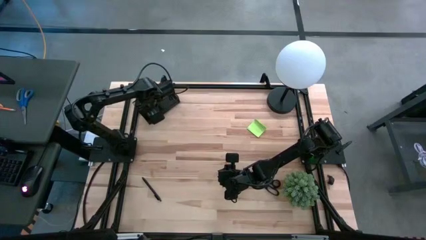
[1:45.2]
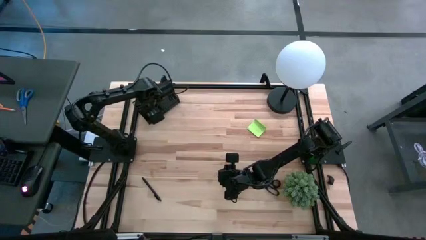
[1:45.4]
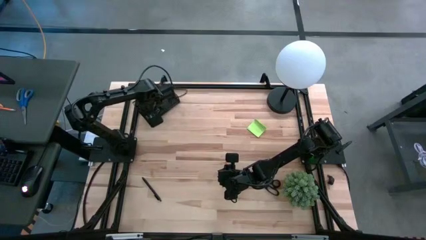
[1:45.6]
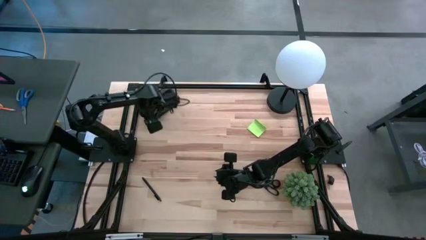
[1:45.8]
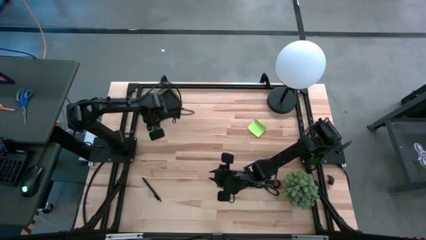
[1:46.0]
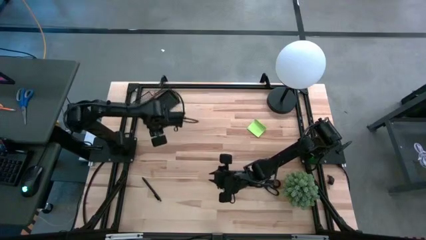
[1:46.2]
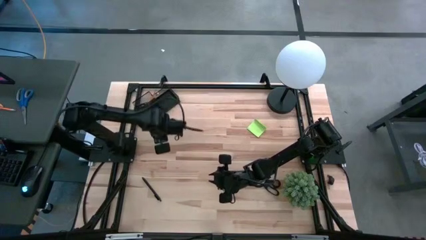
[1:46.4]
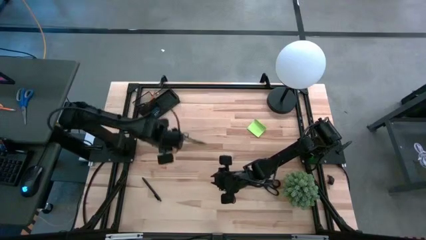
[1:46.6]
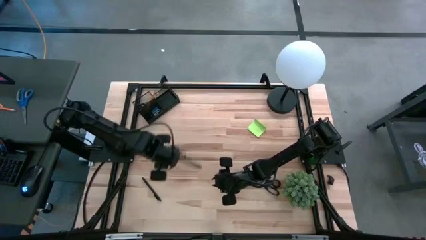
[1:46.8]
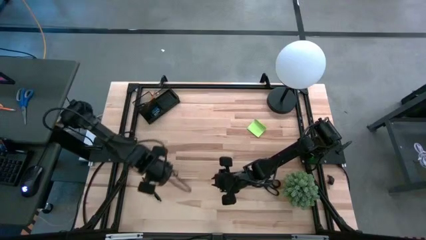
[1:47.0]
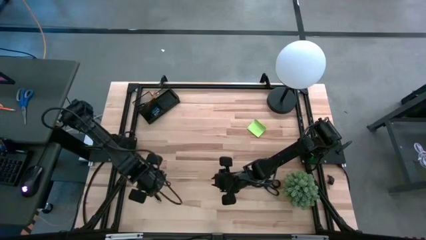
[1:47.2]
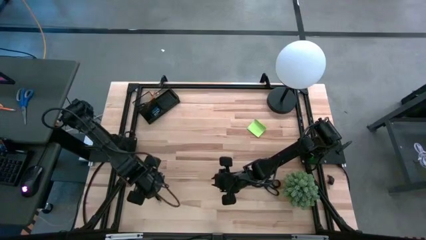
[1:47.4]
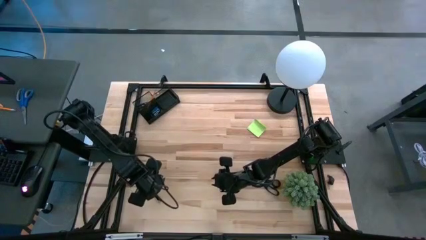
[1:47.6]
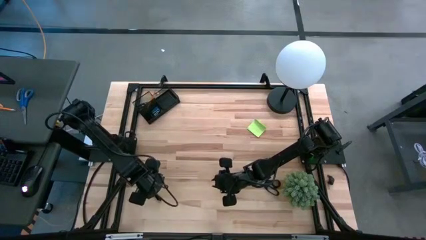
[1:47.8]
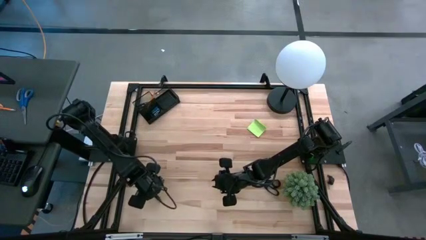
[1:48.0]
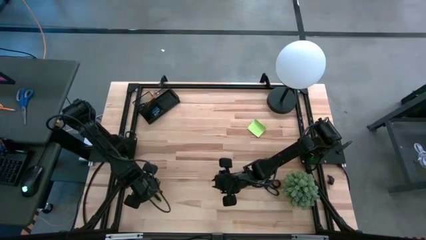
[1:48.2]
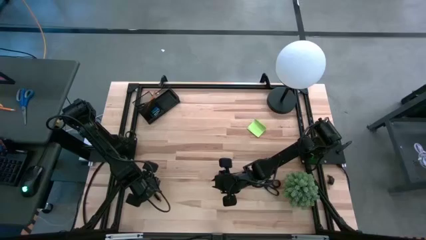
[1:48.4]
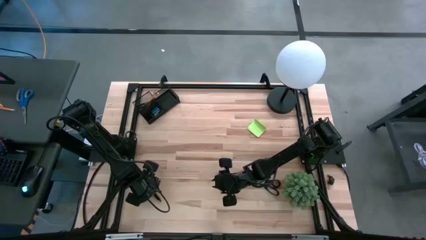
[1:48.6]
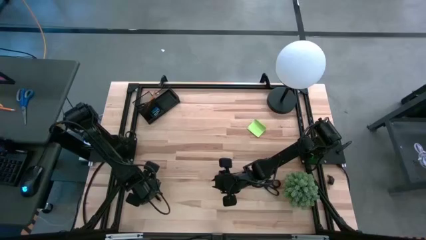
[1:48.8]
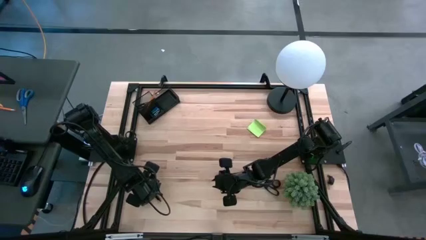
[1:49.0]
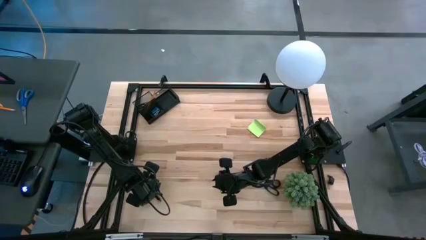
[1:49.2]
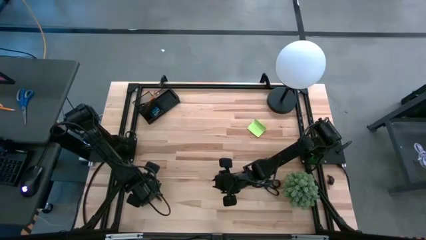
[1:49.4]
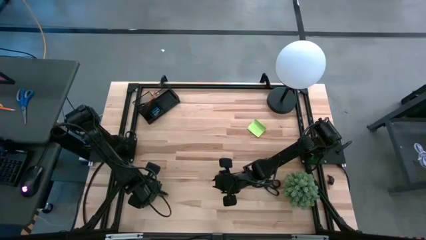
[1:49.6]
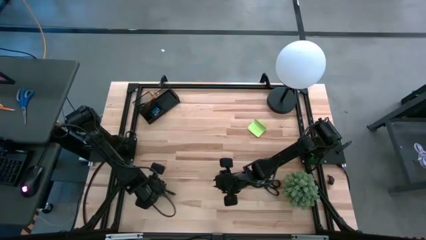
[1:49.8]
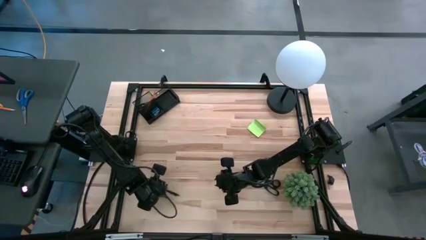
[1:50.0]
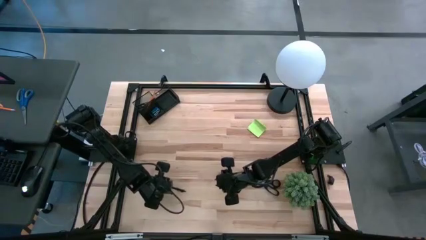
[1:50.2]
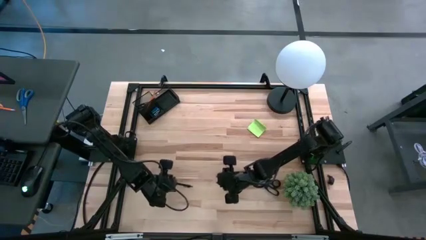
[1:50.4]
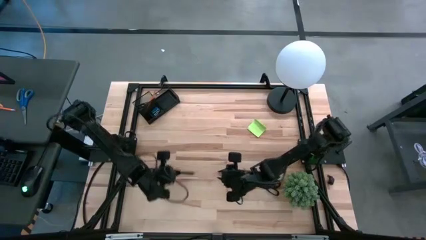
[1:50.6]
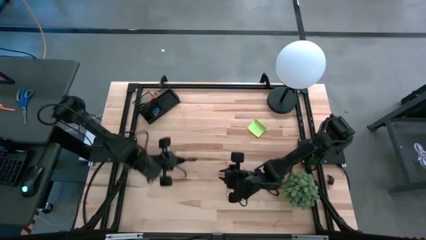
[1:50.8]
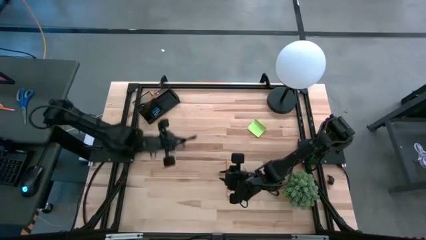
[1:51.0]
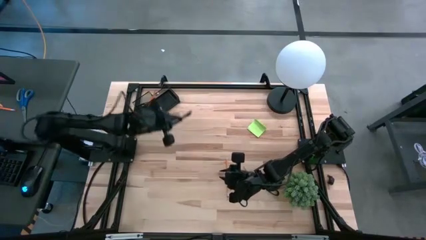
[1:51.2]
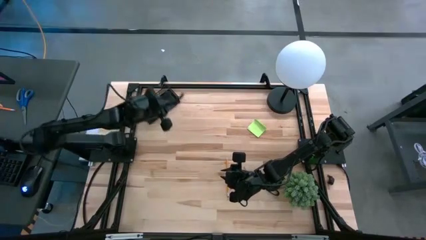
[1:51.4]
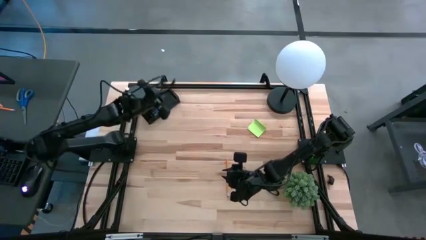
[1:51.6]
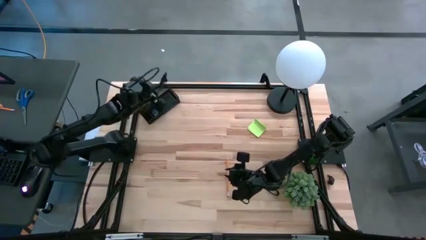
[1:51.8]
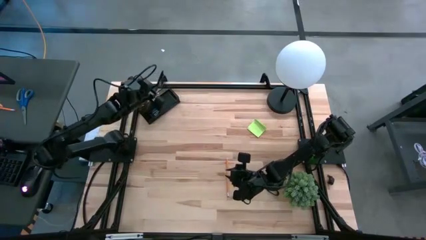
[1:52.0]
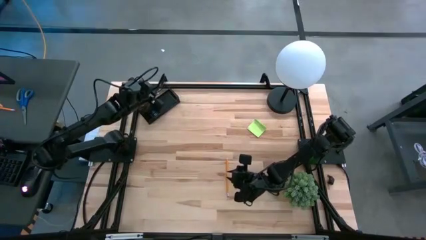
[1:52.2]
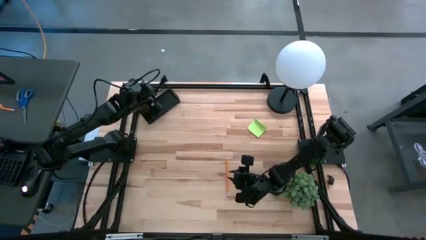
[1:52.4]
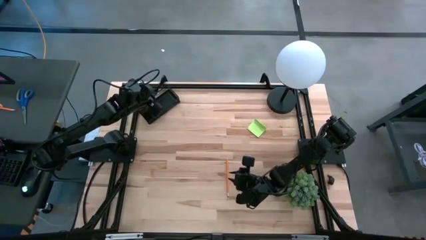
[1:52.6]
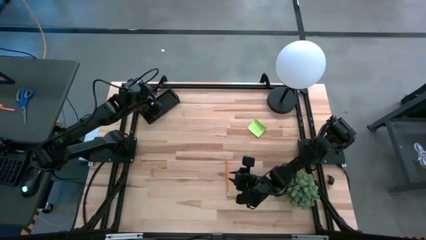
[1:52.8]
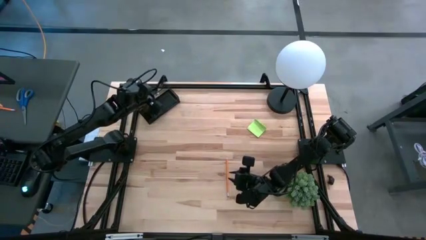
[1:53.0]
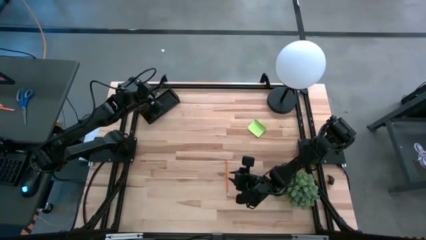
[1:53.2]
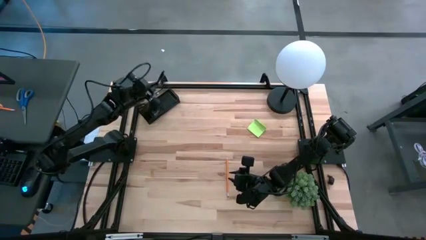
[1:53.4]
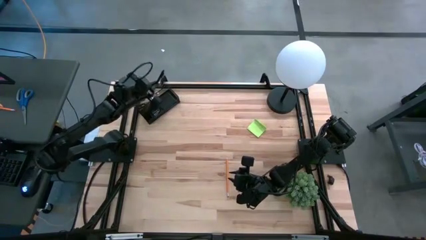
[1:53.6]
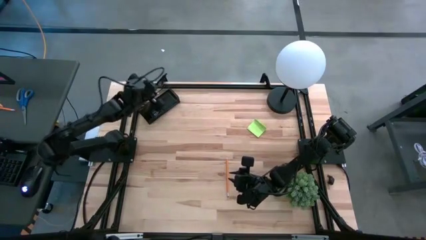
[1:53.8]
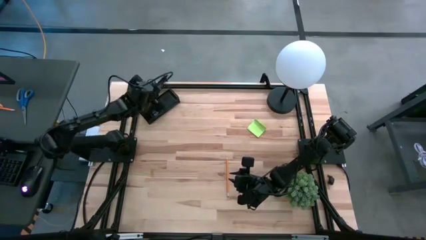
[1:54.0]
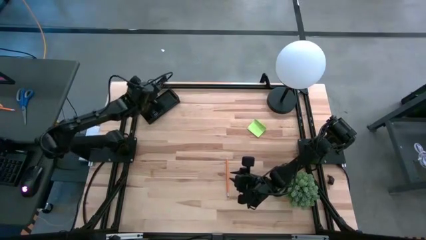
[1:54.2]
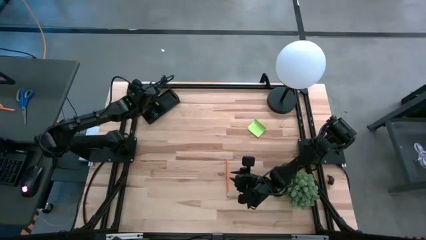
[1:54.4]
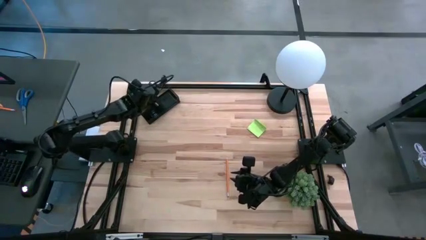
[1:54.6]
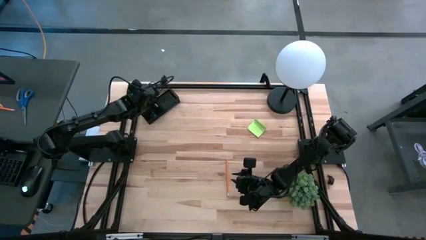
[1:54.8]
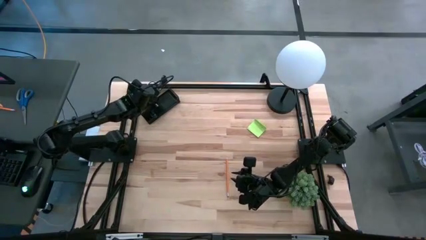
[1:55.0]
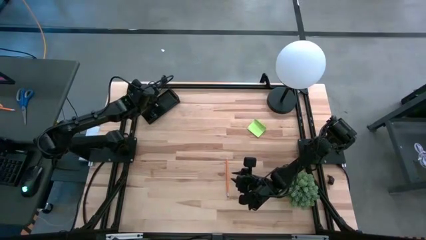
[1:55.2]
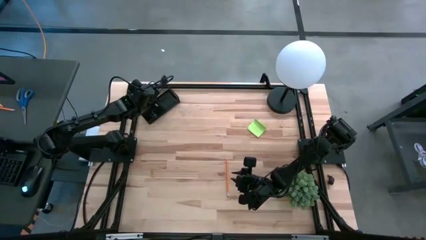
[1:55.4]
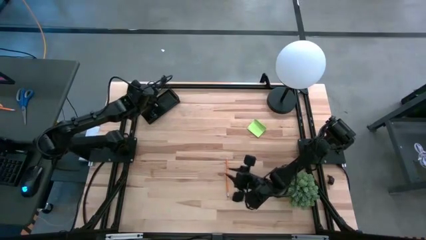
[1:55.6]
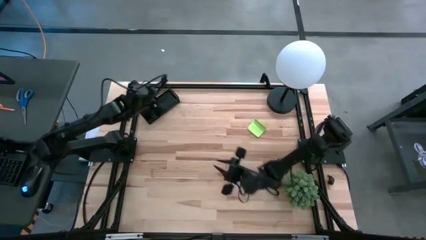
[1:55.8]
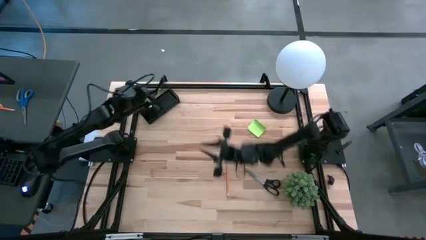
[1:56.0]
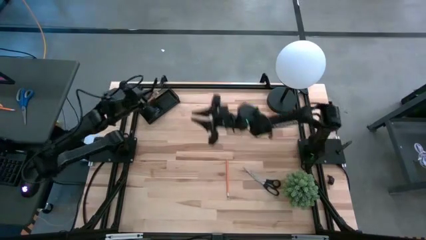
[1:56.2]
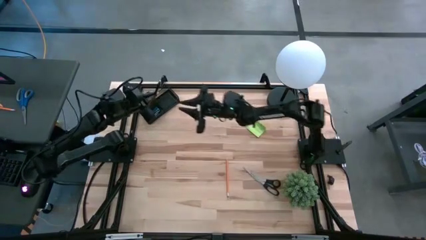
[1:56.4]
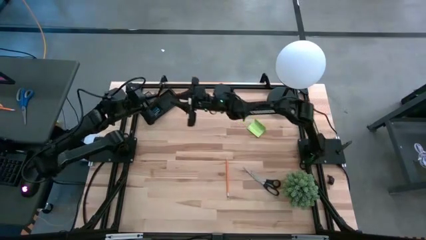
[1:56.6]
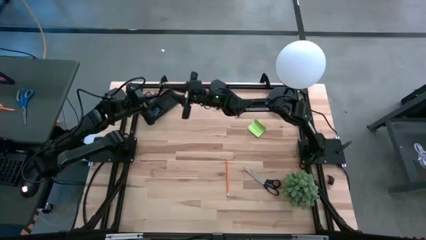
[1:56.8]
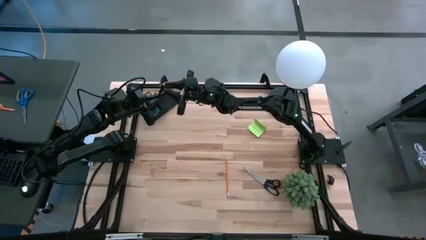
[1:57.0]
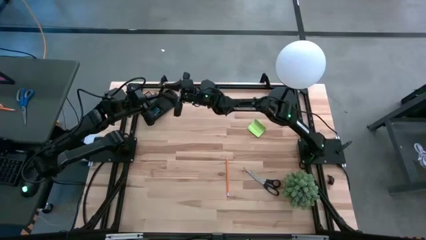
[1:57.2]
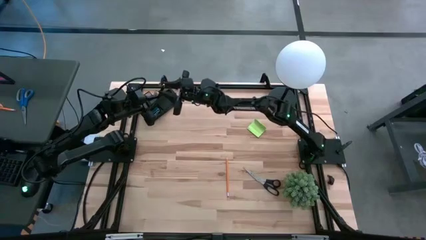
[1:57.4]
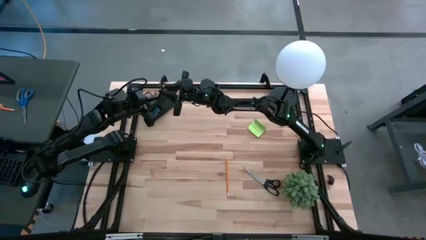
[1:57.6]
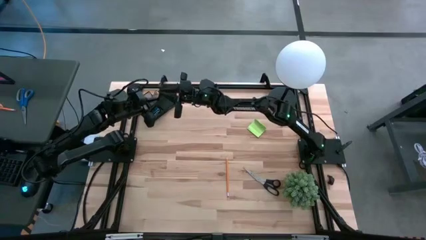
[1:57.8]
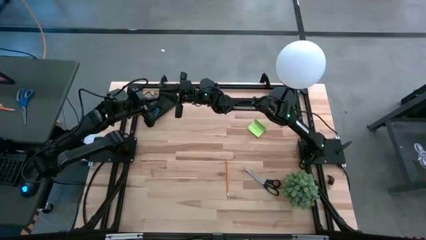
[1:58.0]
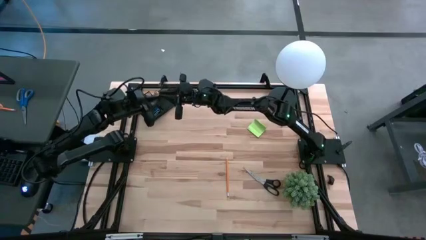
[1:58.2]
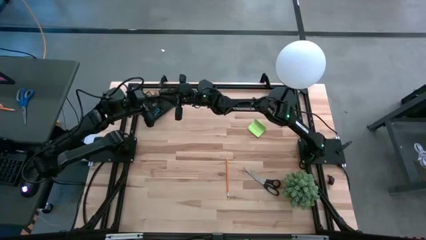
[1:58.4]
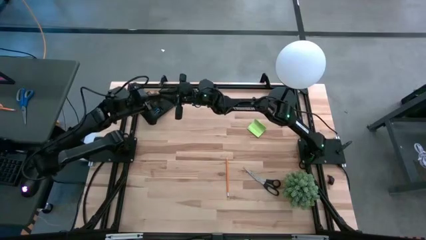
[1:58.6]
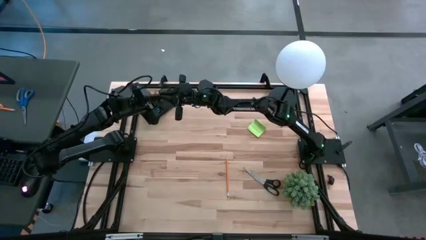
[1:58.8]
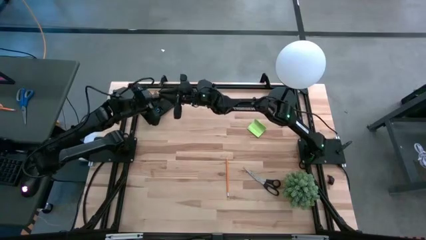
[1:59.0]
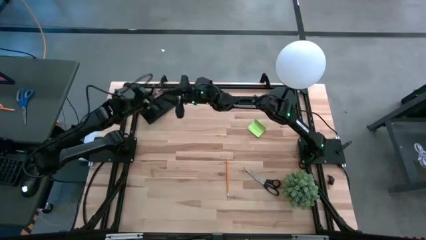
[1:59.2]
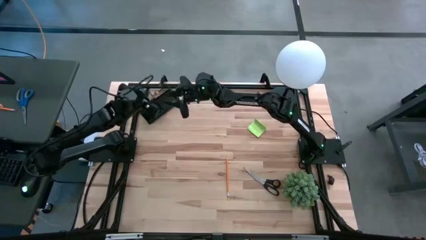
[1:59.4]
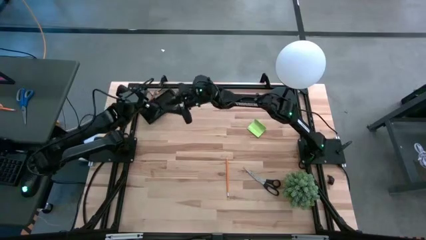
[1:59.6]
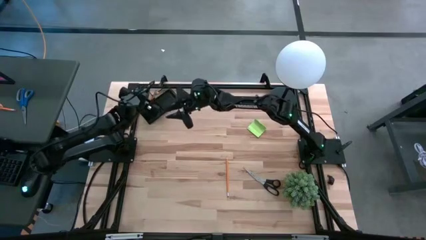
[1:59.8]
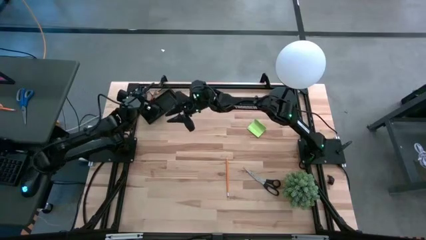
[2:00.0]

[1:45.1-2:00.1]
Task: Pick and place office supplies into organizer
Put the black pen into the top left section of the desk organizer
